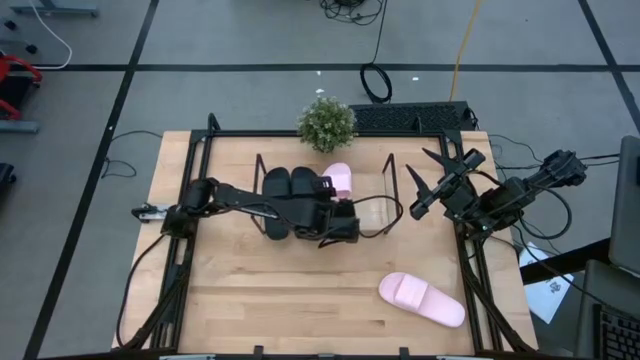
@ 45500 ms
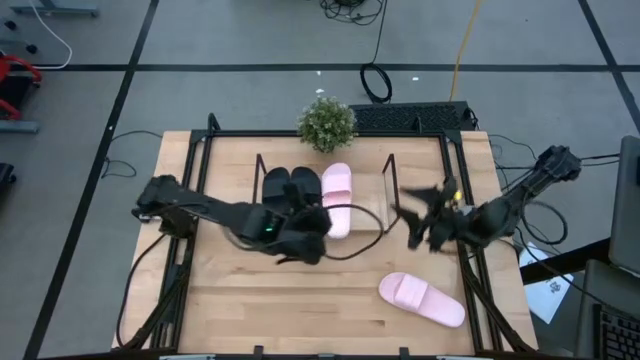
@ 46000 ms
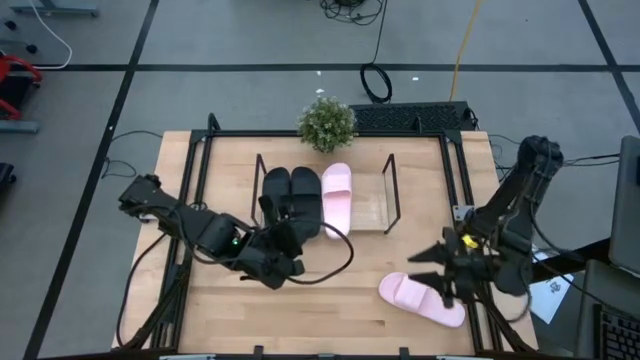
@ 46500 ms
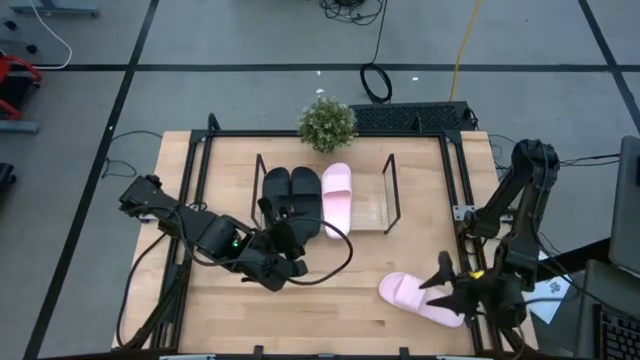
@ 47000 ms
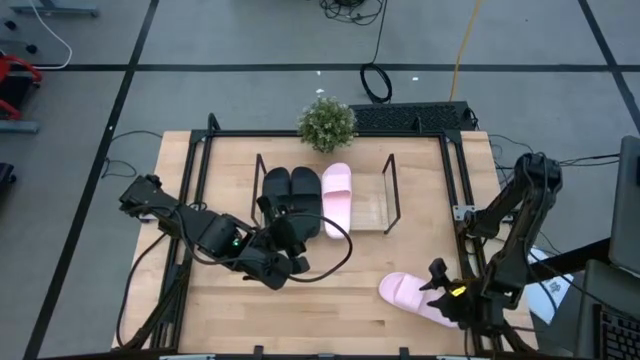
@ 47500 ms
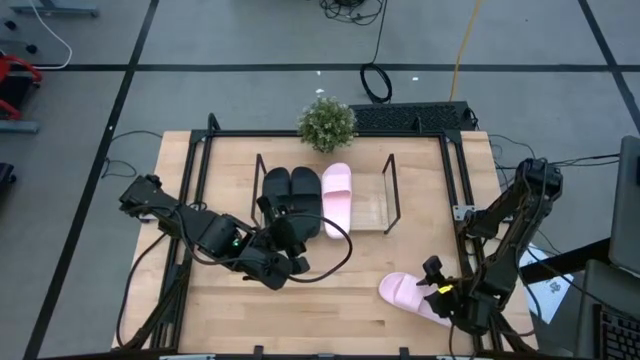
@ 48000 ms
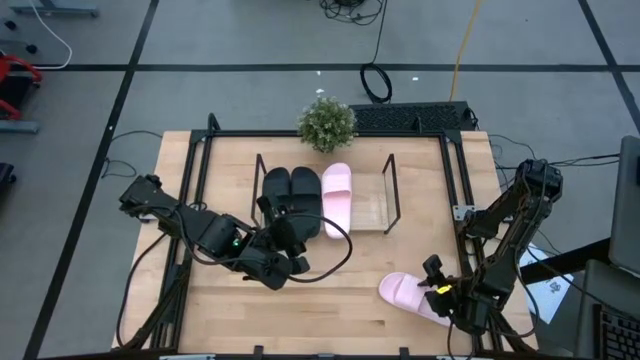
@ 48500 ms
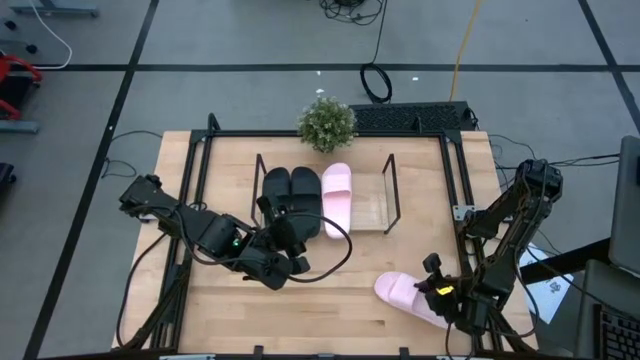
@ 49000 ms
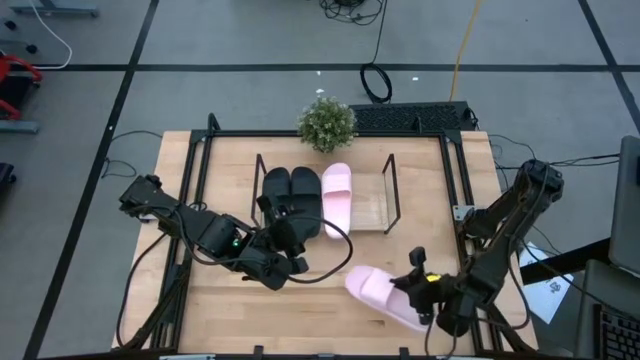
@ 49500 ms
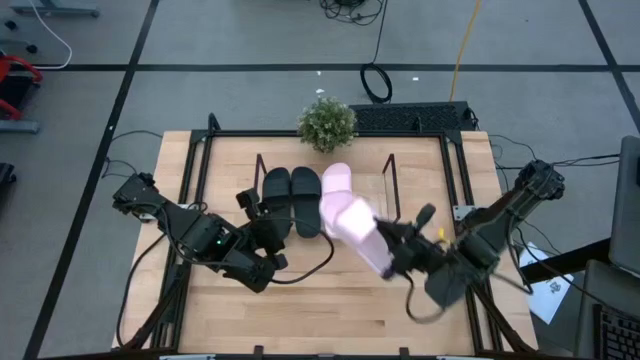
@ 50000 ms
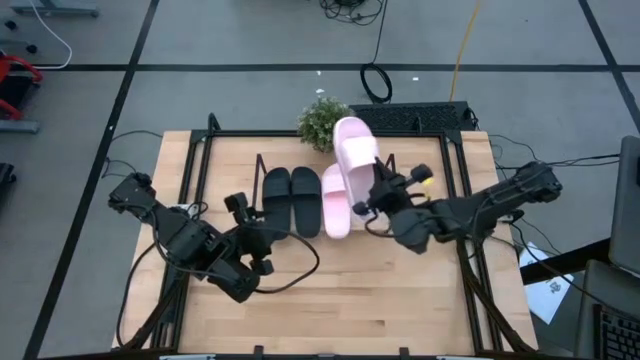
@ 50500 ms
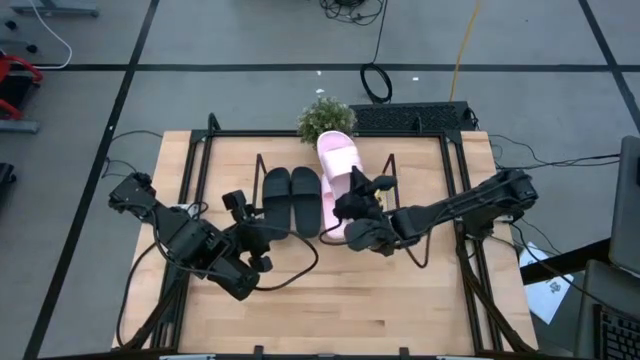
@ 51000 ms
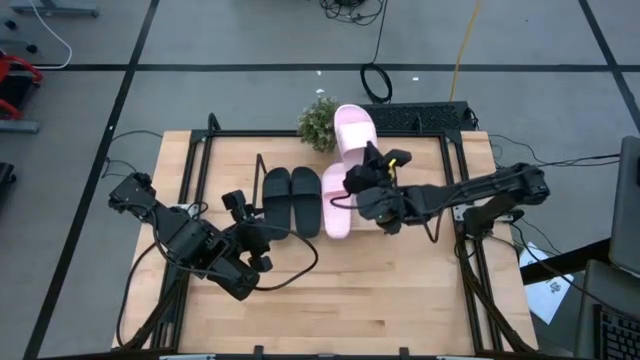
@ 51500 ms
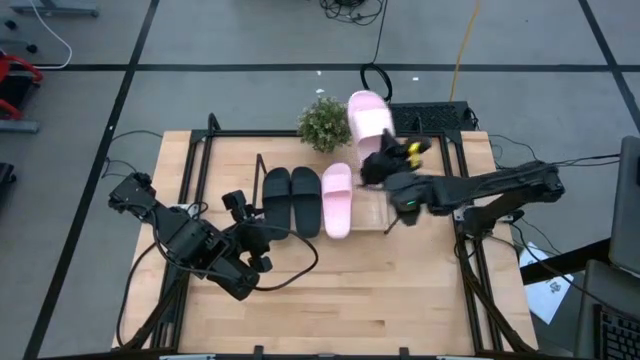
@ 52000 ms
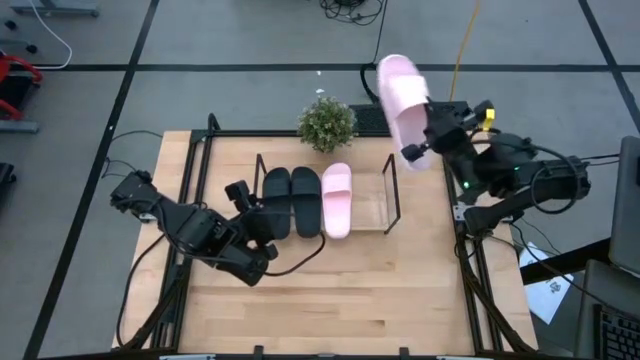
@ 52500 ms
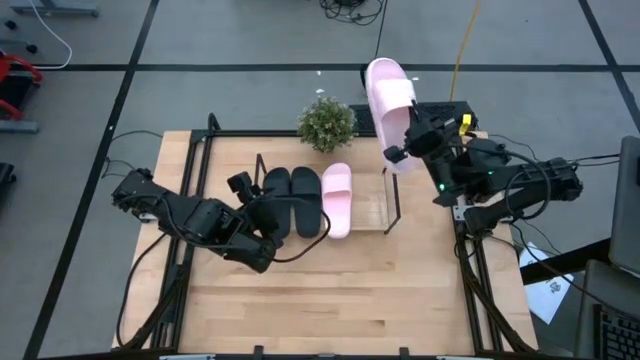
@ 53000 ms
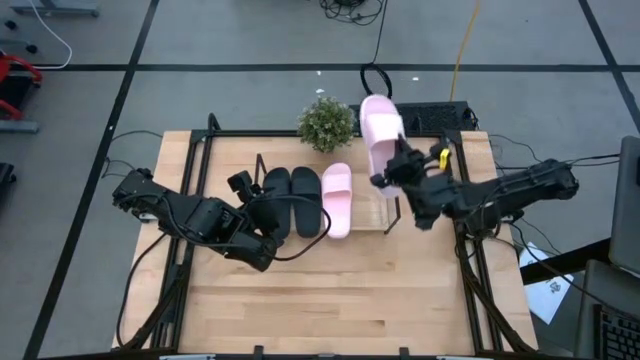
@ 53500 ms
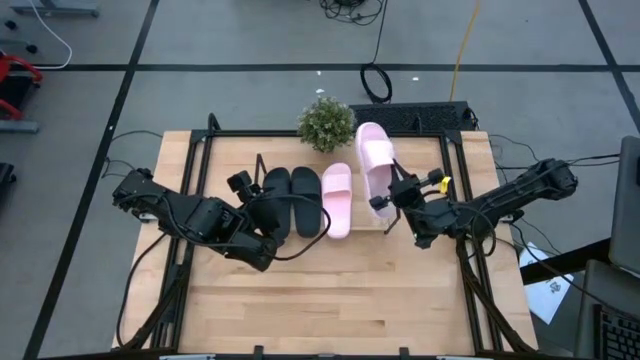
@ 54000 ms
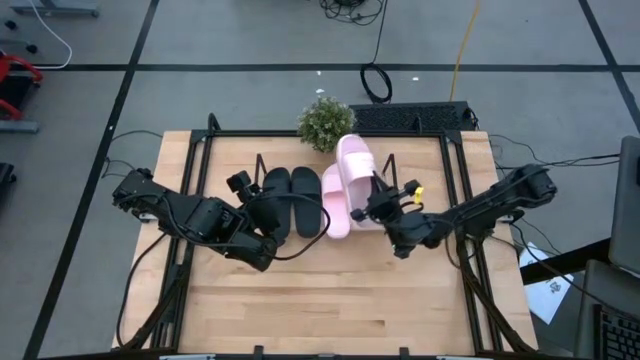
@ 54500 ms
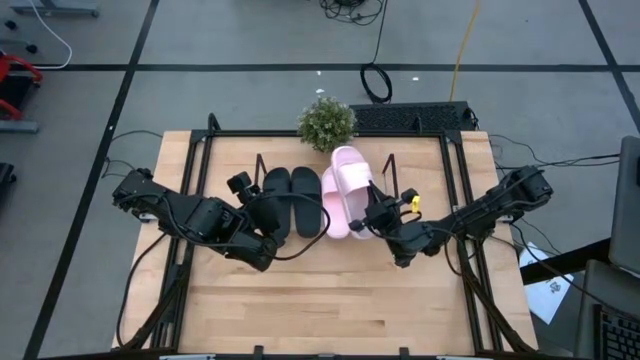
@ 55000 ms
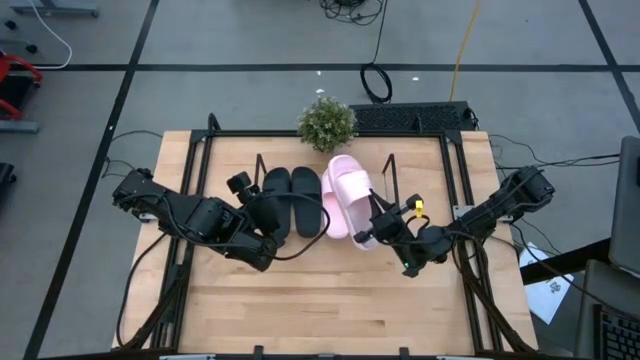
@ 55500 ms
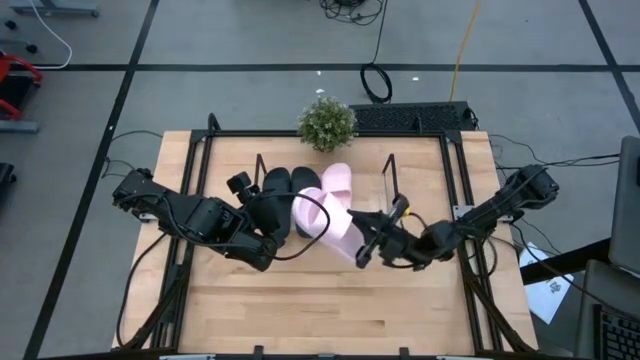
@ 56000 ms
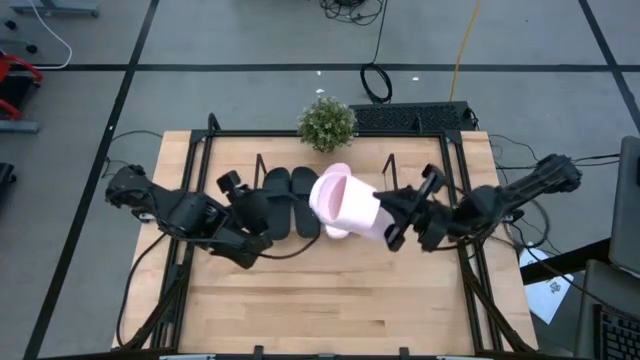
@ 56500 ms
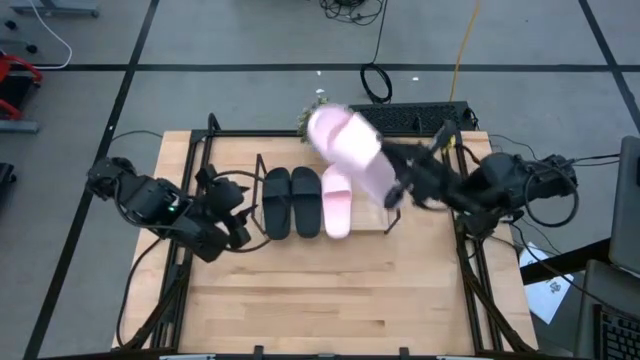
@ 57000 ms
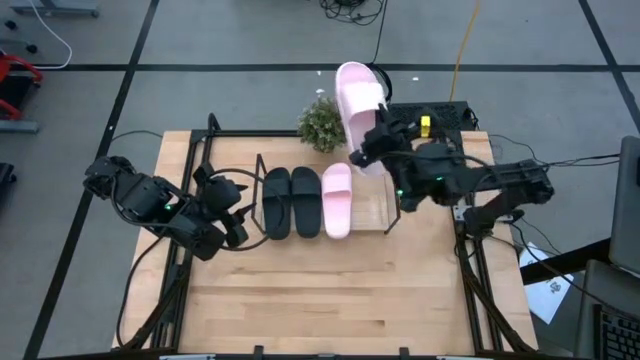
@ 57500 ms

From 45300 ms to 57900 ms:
Task: Pick and place slides into the shelf
Put the pink slide on the shelf

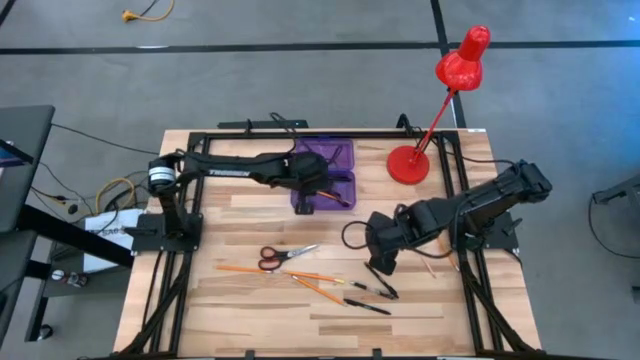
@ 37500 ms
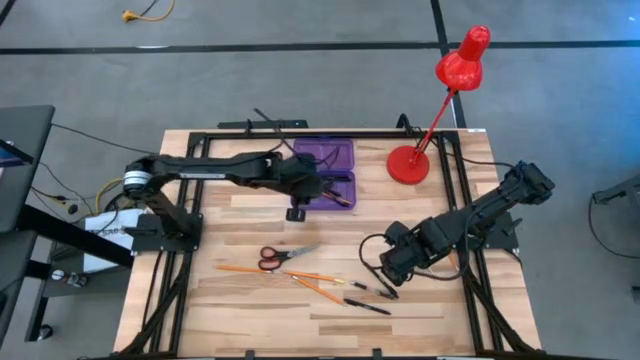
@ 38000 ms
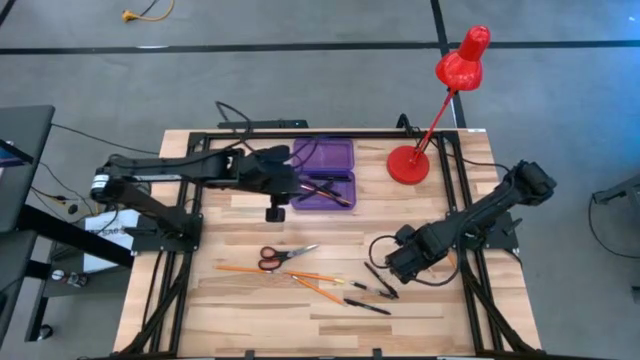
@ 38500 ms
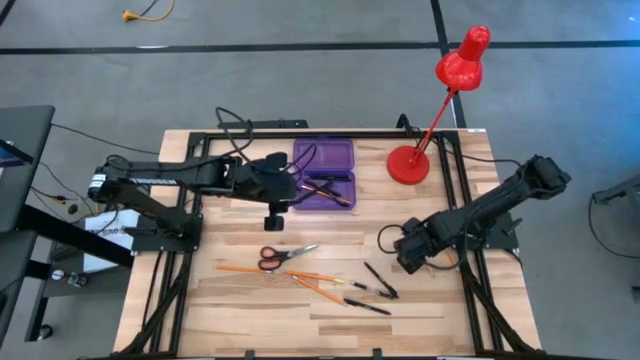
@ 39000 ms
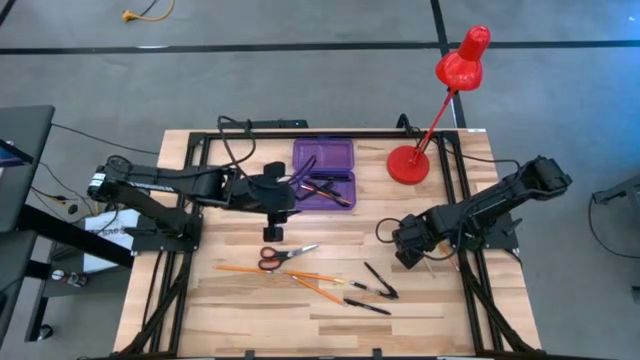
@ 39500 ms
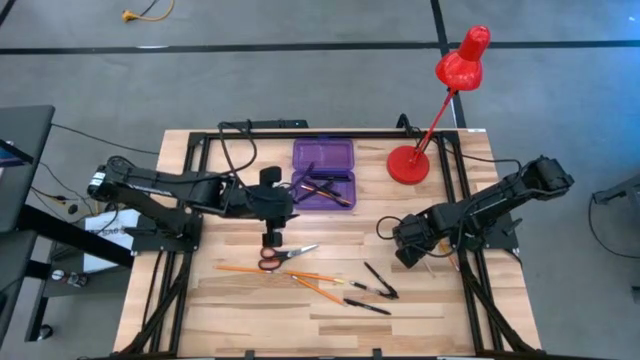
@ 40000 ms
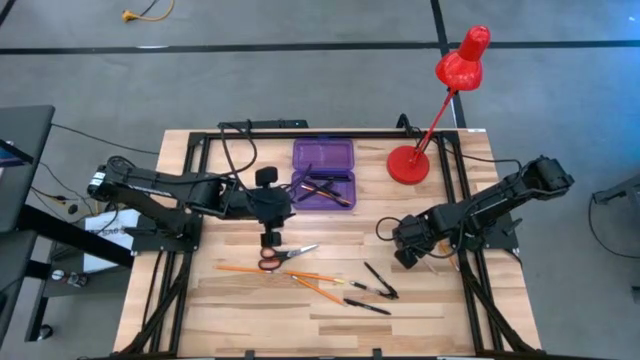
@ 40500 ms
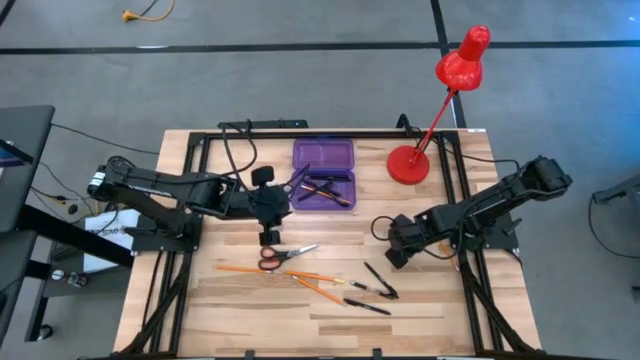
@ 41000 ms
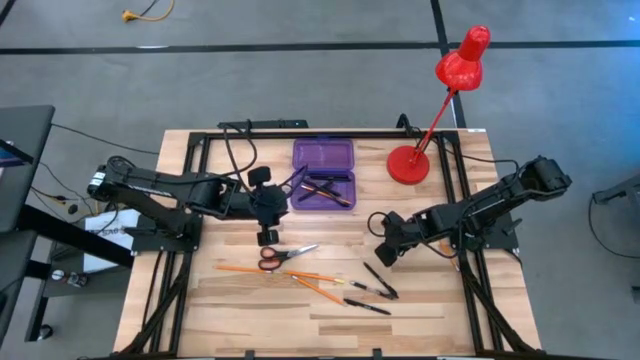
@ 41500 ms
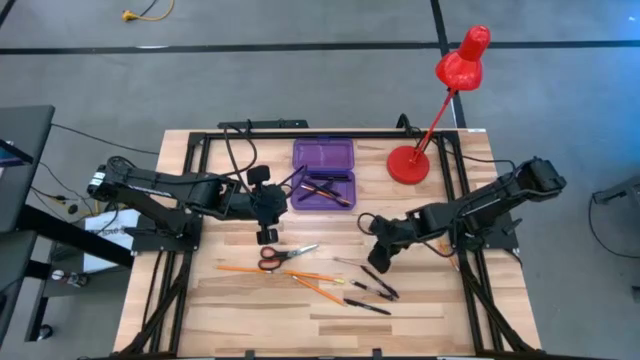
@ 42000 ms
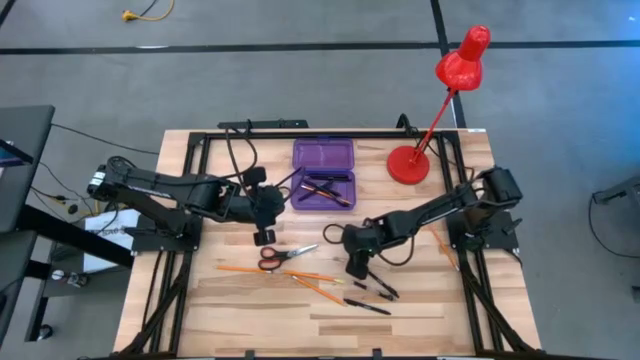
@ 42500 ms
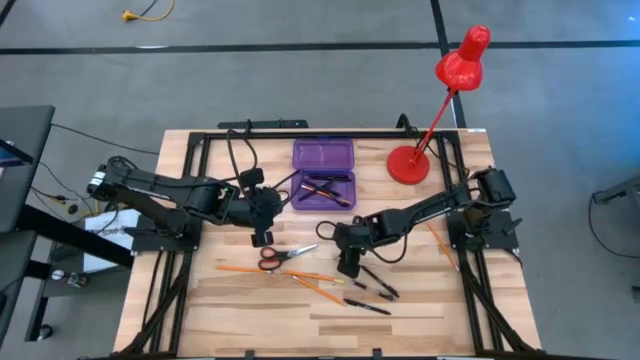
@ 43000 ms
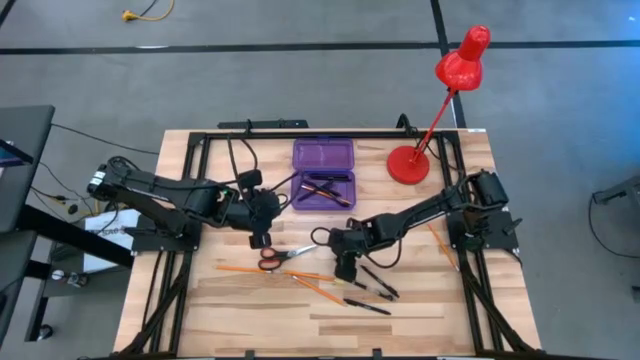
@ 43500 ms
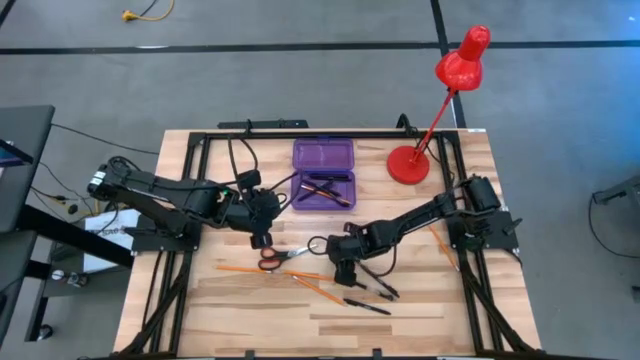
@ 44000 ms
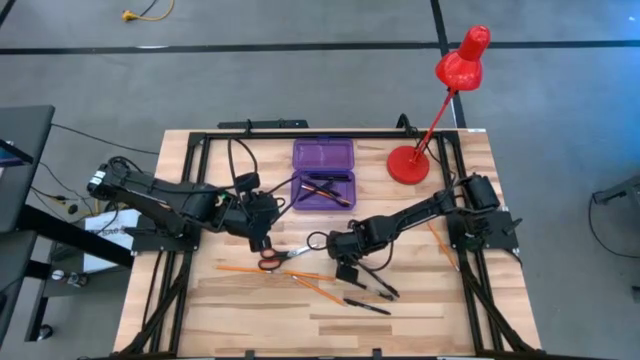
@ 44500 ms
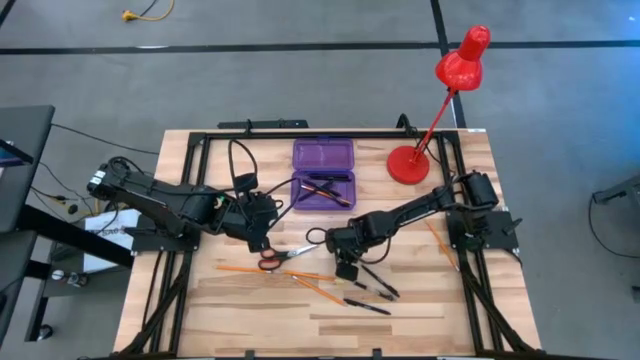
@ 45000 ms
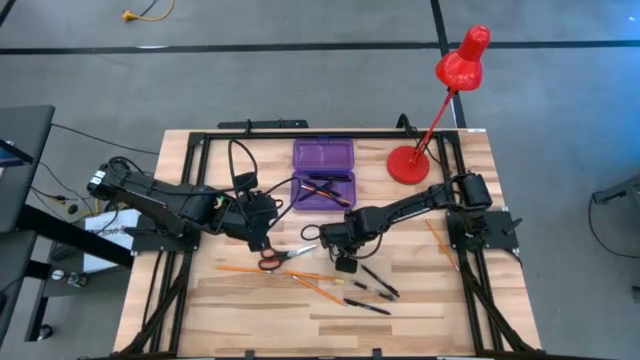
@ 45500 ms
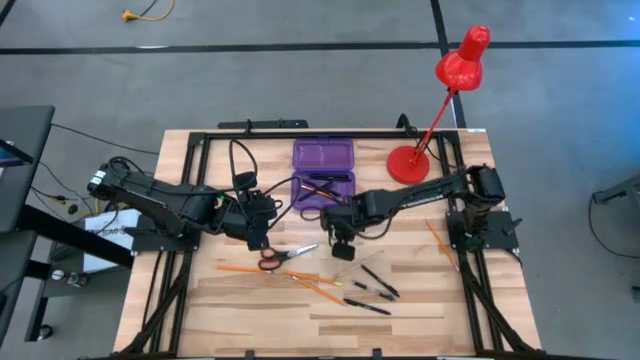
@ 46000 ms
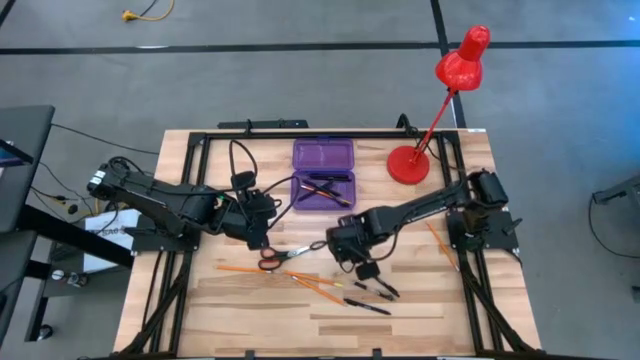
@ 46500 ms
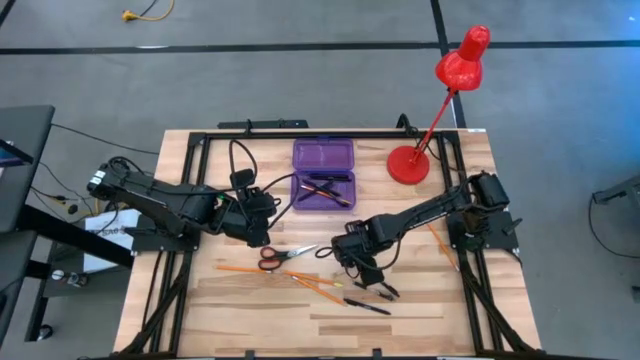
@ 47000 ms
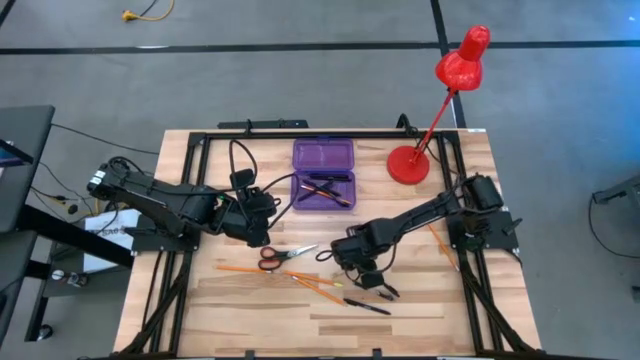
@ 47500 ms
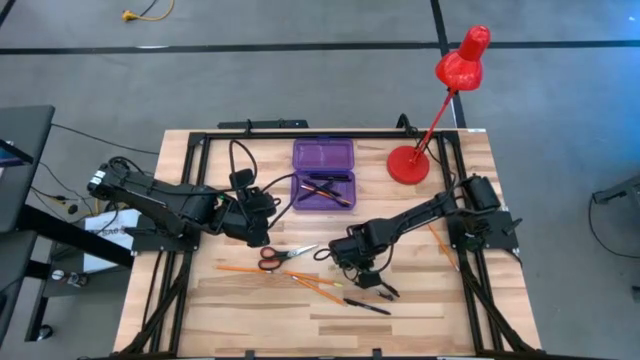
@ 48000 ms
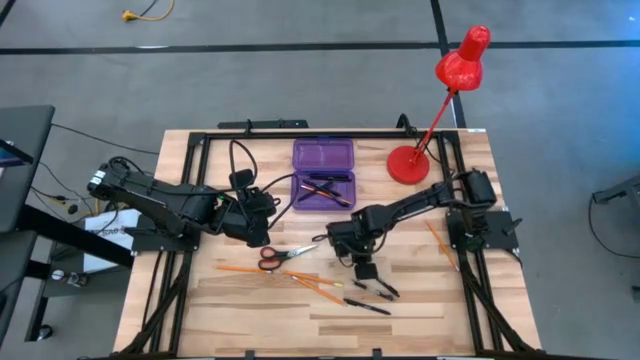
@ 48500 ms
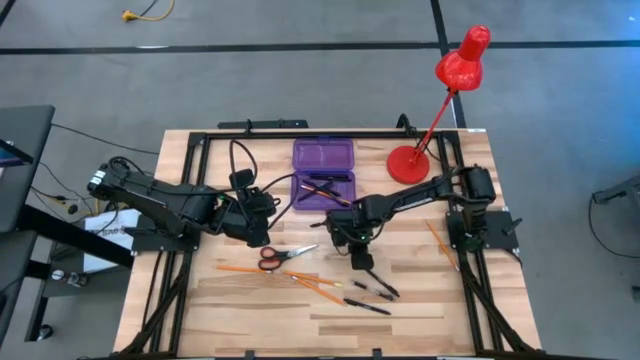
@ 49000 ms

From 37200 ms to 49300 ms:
Task: Pick & place school supplies into a supply box
Put the light brown pencil into the purple supply box
